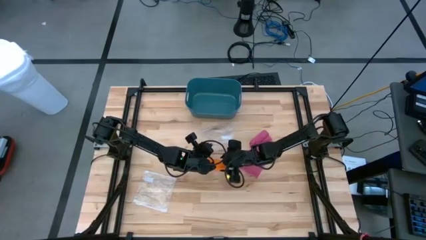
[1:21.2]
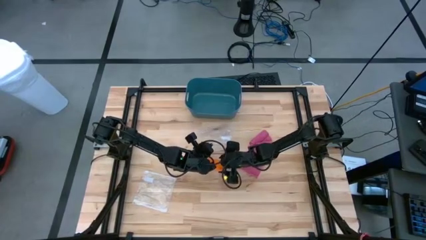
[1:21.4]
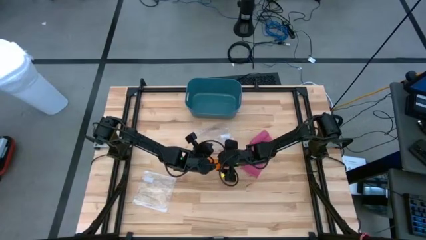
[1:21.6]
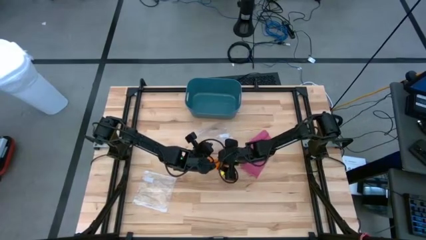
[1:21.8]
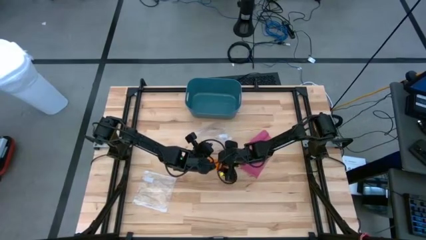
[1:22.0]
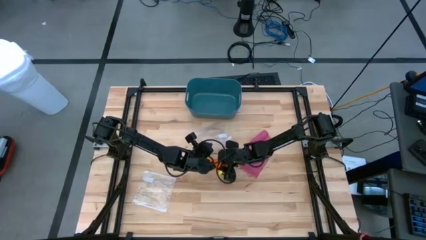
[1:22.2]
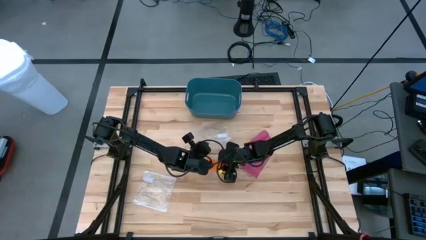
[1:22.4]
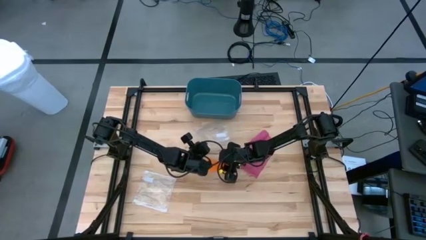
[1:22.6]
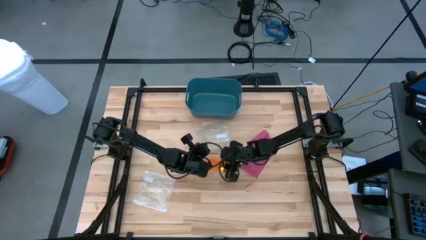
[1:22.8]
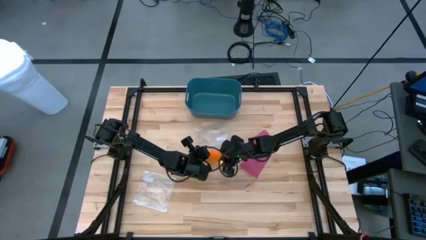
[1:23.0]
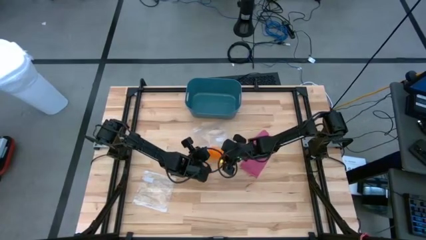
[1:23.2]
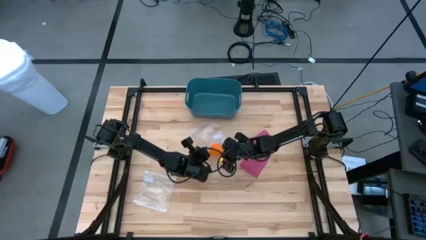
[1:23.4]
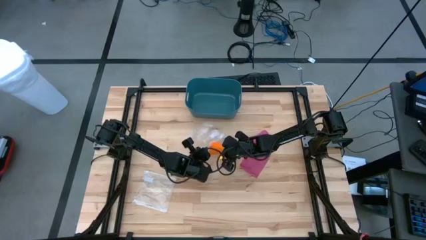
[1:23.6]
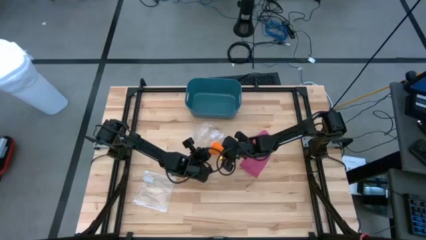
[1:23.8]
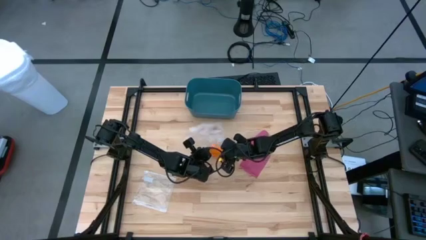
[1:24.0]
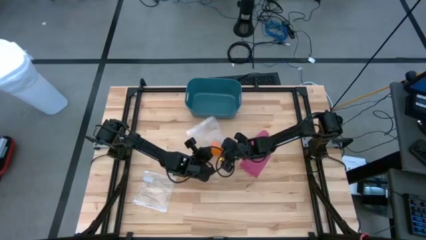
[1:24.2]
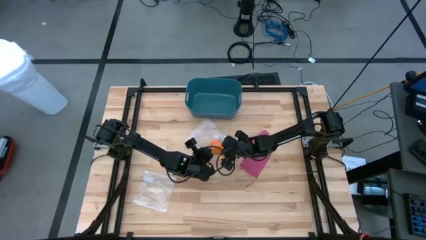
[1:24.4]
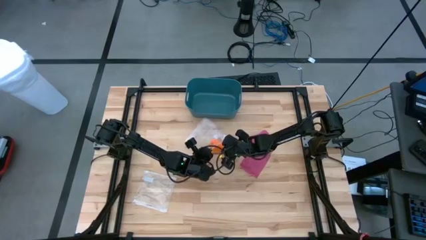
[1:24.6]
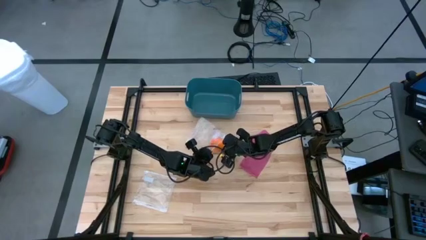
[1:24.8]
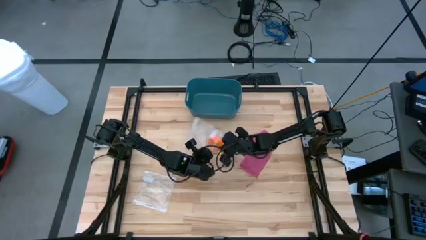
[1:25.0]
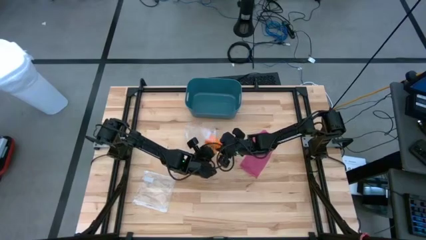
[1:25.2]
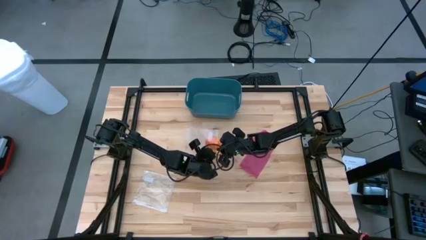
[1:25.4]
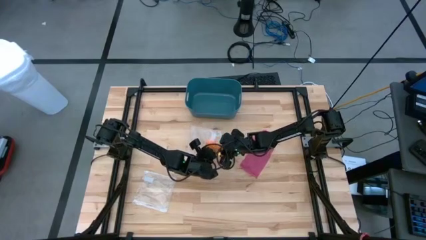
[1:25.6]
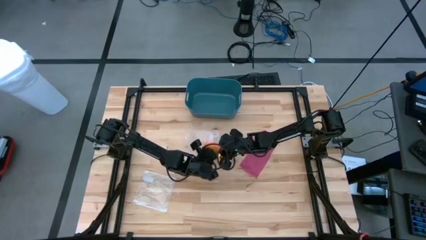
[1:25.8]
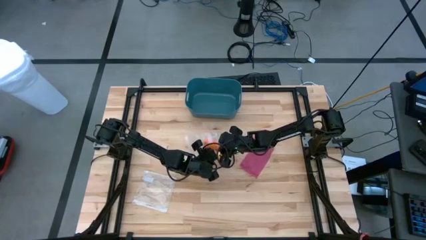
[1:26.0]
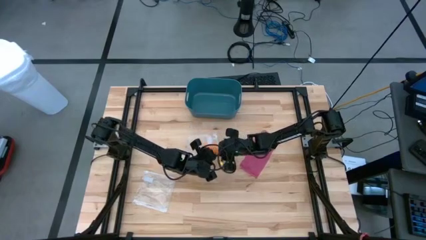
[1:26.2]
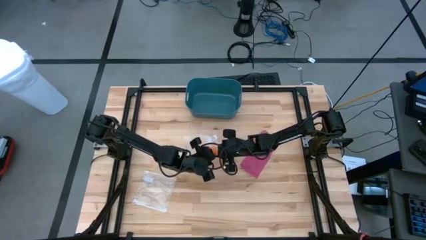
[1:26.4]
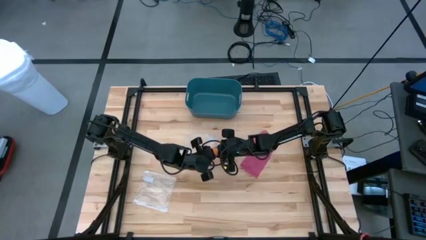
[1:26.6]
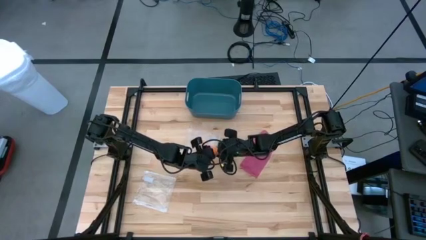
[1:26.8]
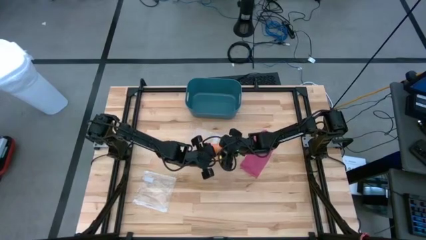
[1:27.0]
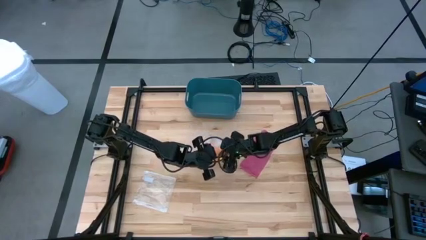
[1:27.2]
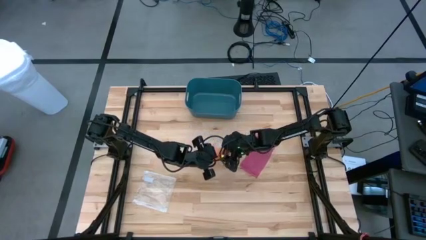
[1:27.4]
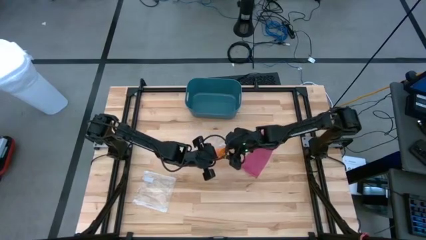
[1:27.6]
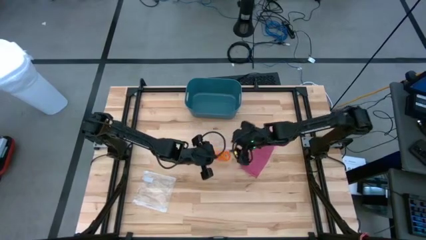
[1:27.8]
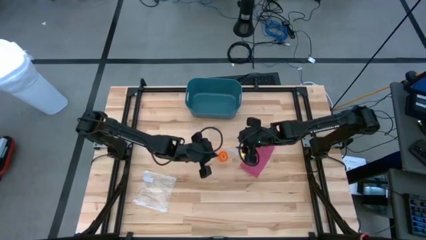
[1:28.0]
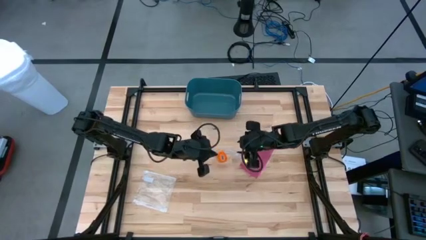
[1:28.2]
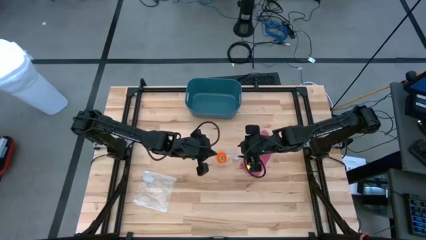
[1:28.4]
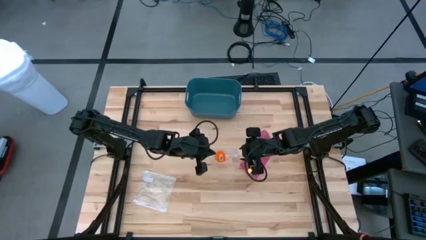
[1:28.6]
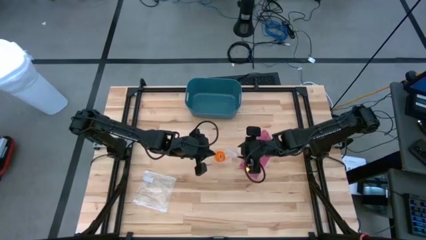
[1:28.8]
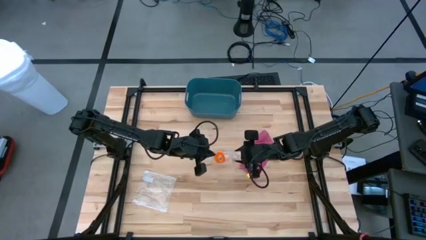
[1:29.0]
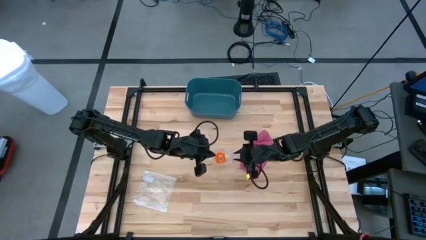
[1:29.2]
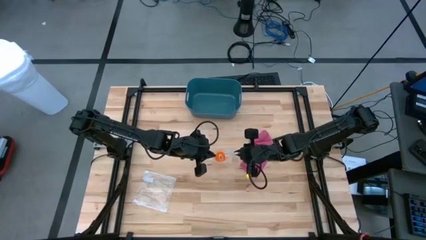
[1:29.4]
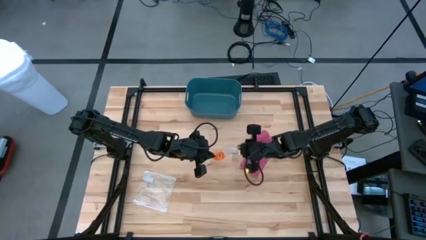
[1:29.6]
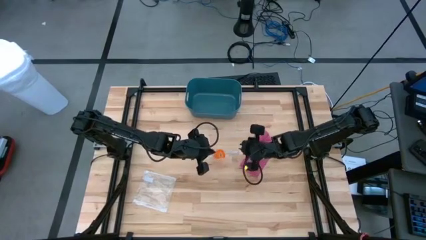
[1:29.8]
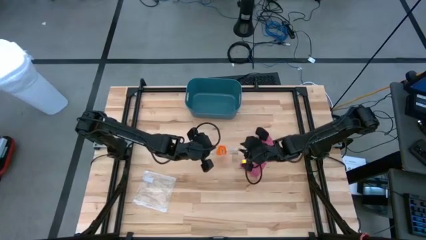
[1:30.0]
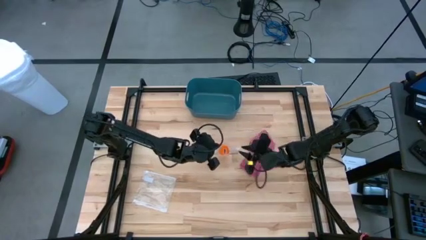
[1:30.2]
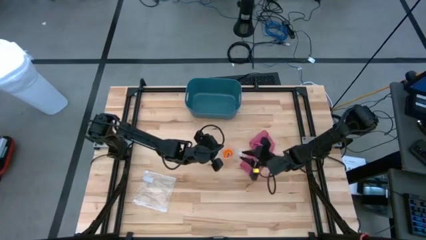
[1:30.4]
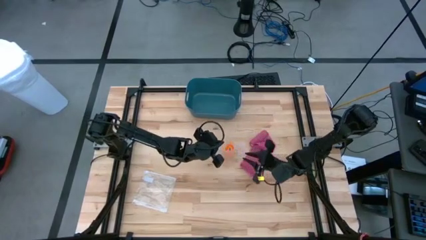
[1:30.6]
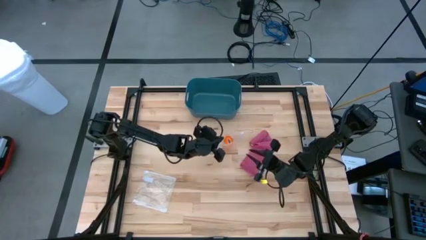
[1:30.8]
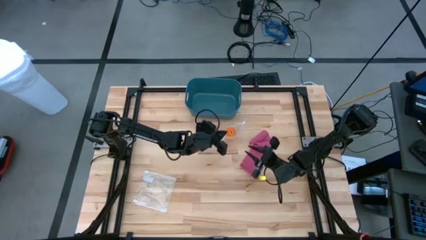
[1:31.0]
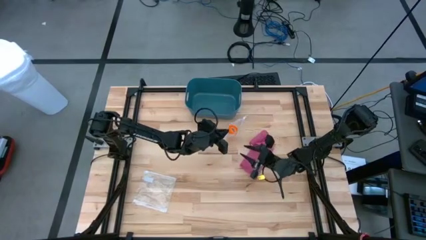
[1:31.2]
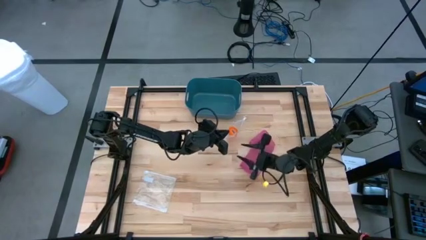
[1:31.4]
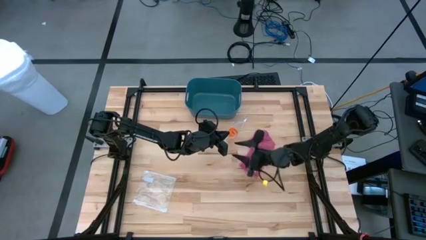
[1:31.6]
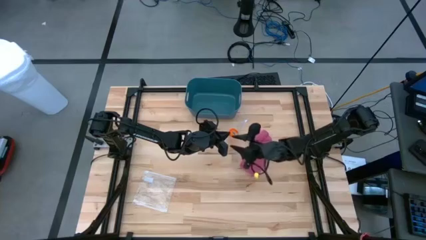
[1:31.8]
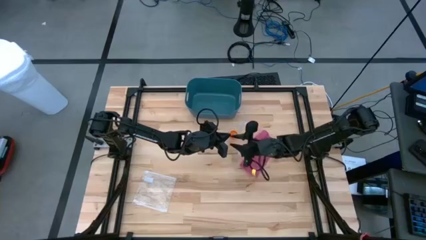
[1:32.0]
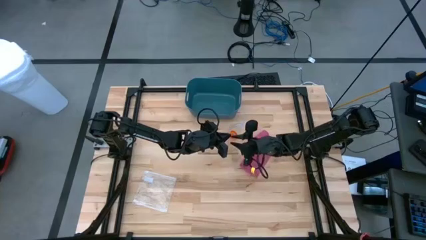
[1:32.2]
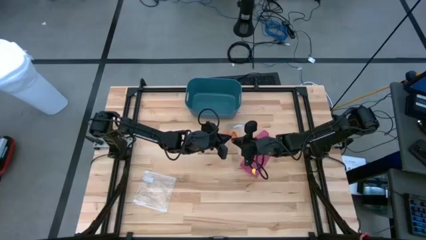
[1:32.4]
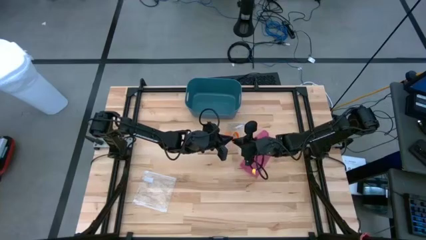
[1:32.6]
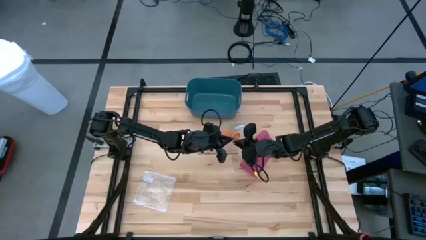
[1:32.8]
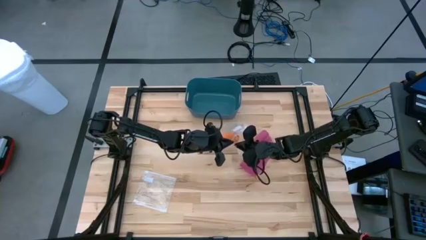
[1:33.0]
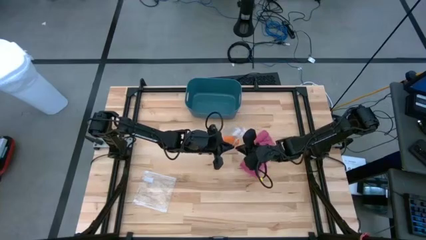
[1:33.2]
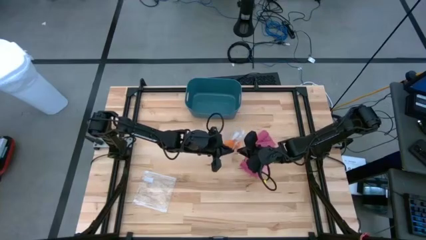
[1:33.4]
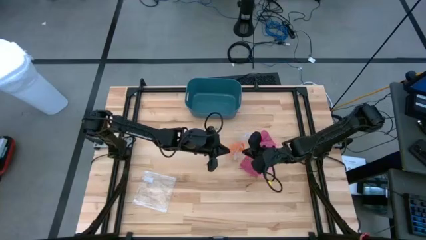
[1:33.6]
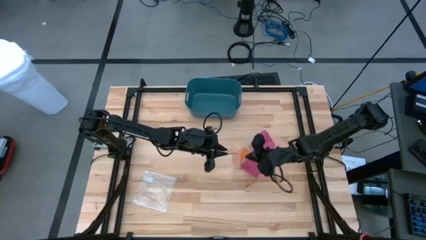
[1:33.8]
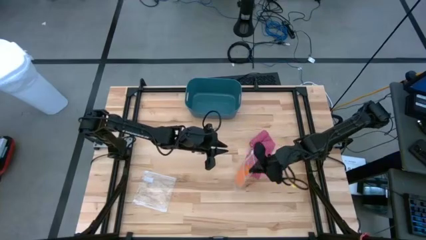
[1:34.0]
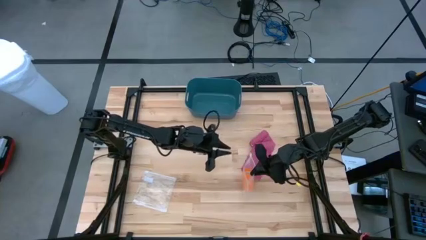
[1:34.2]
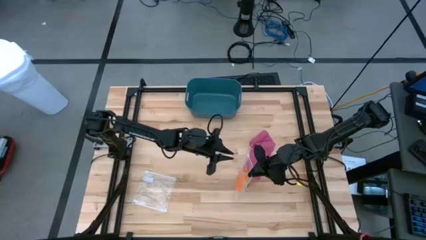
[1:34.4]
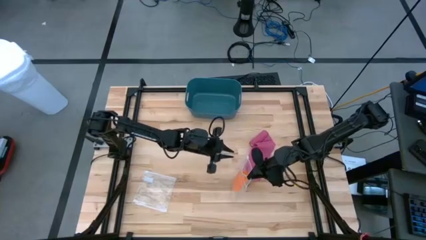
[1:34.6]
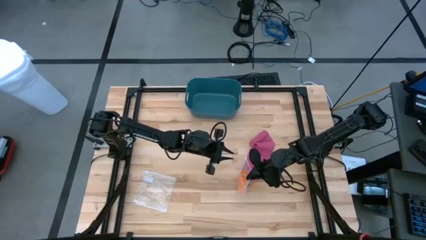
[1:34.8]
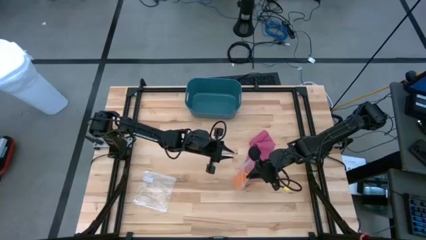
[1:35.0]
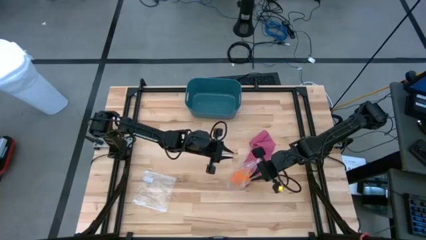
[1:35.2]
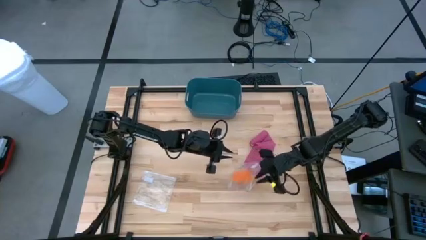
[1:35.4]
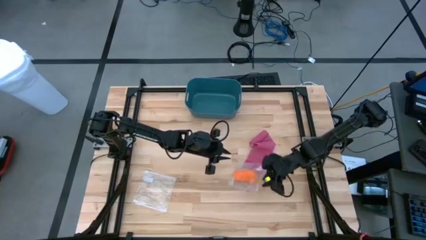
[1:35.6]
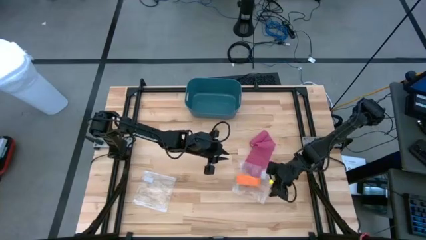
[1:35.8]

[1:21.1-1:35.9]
Task: Roll bandage
Put the rolled orange bandage into the right transparent zip lock

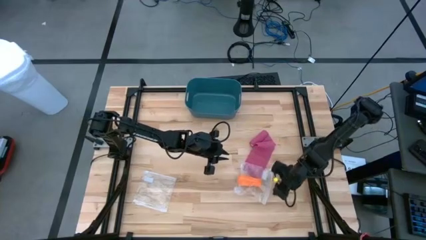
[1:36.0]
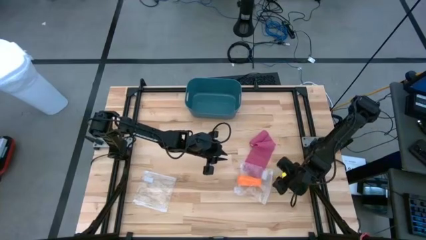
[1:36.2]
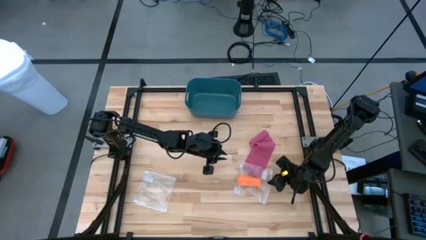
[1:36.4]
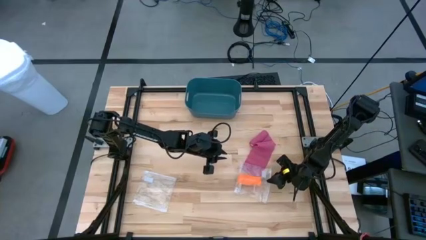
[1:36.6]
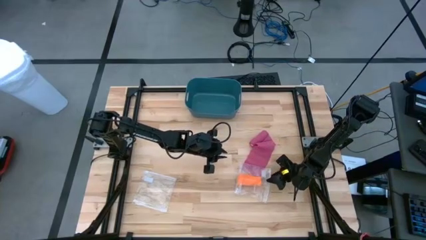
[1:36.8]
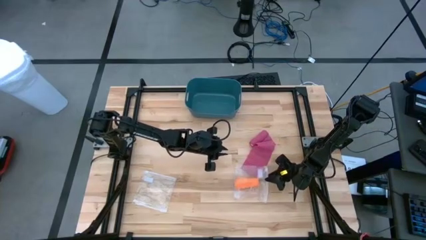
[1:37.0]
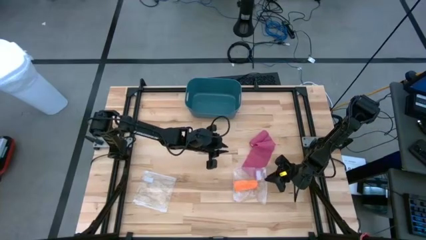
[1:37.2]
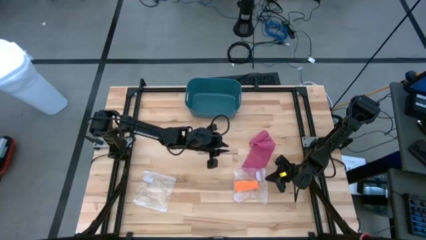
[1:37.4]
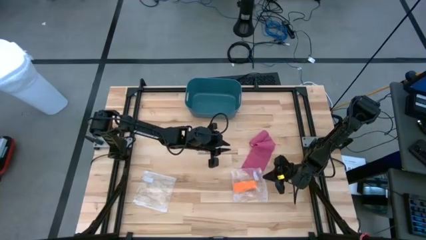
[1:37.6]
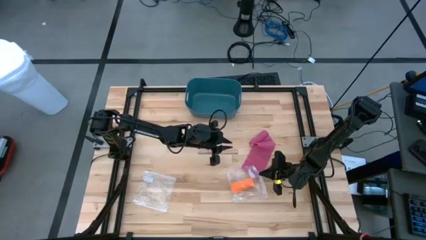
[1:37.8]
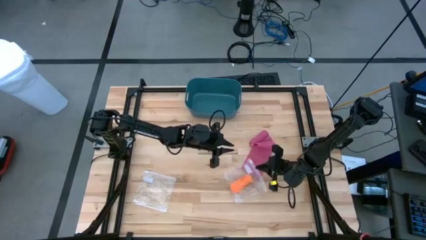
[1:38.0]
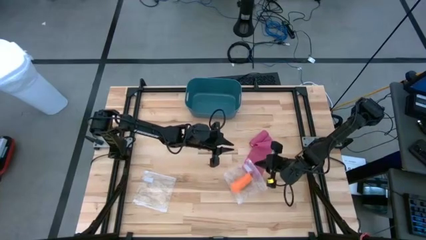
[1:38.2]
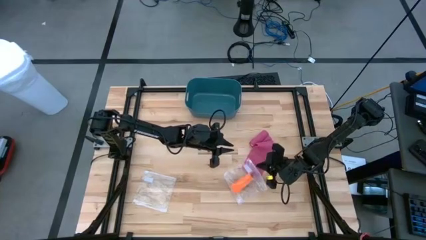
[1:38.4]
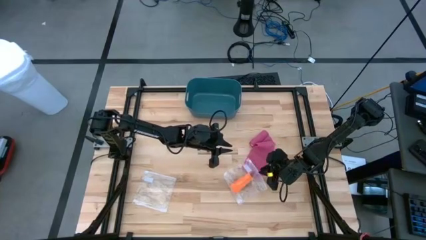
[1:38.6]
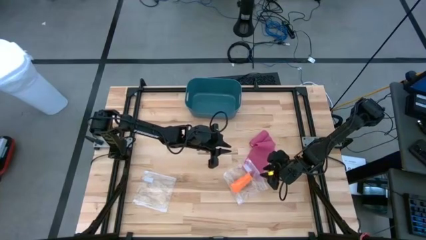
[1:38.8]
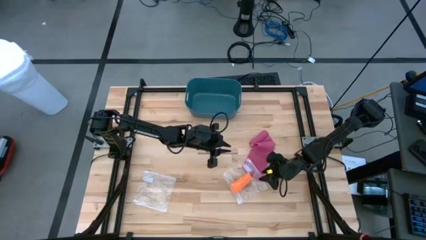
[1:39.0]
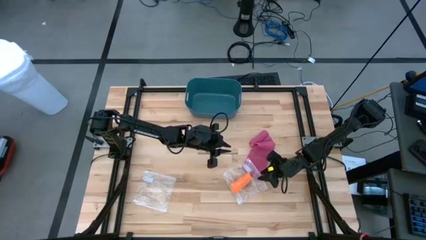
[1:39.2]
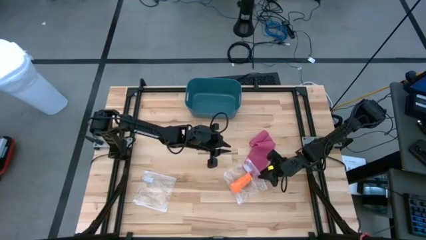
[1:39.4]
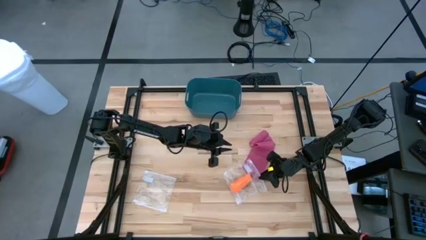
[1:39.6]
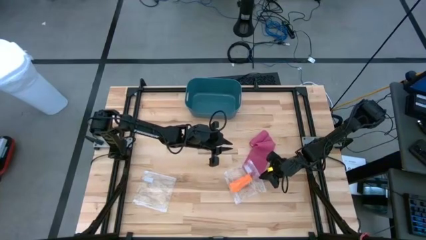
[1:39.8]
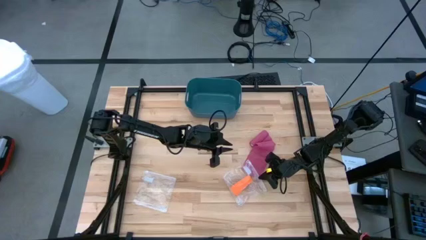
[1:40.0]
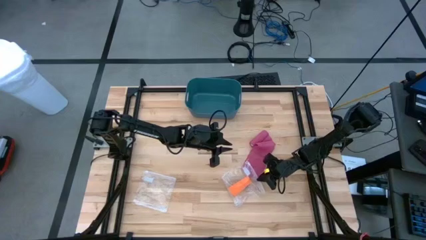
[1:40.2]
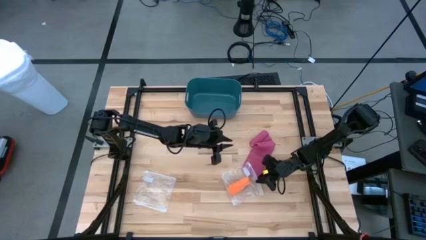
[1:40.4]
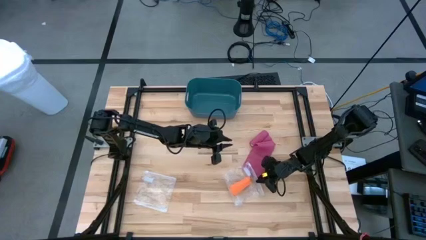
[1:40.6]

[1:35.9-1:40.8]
Close the transparent zip lock containing the rolled orange bandage
